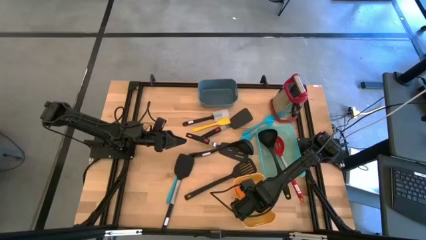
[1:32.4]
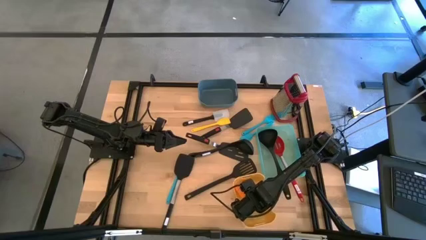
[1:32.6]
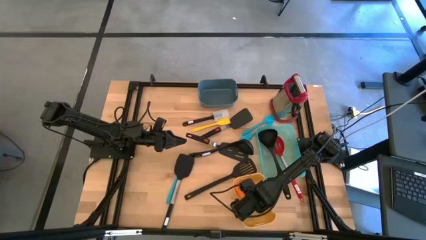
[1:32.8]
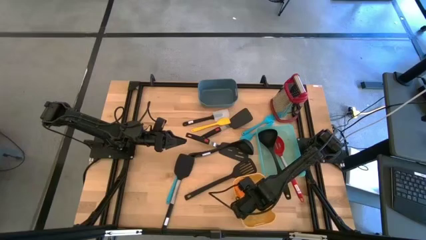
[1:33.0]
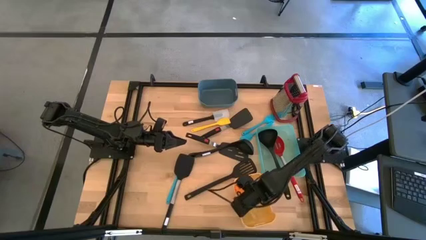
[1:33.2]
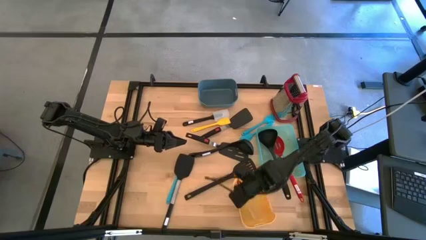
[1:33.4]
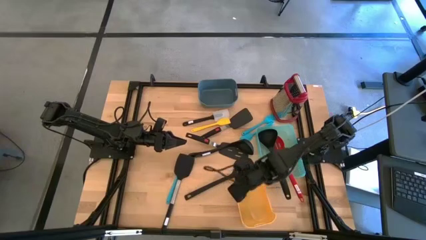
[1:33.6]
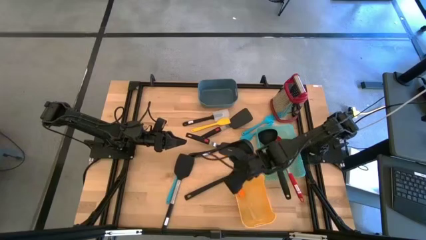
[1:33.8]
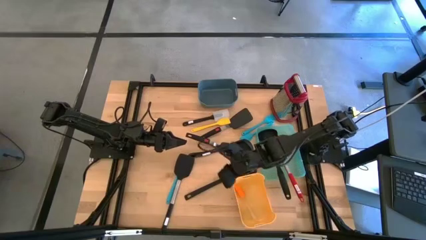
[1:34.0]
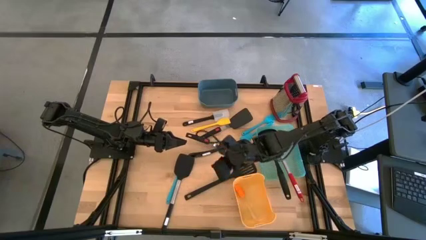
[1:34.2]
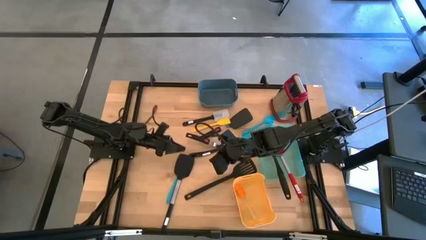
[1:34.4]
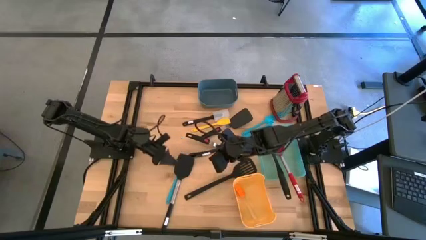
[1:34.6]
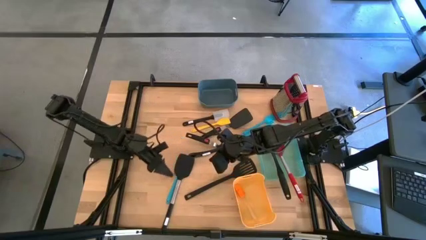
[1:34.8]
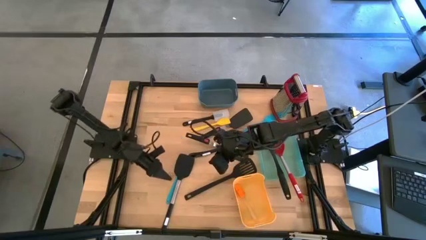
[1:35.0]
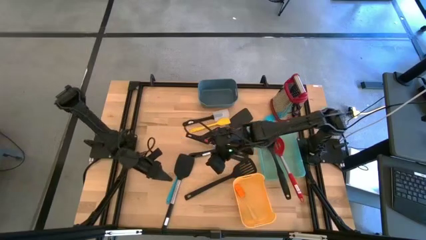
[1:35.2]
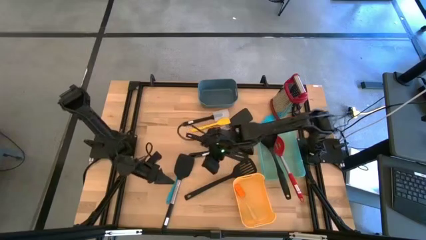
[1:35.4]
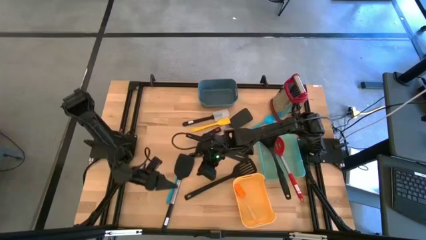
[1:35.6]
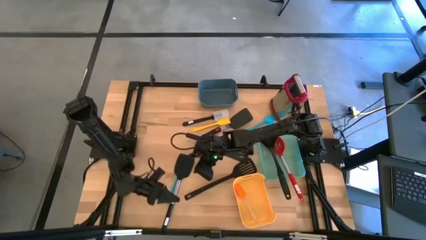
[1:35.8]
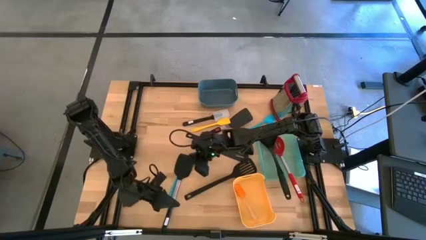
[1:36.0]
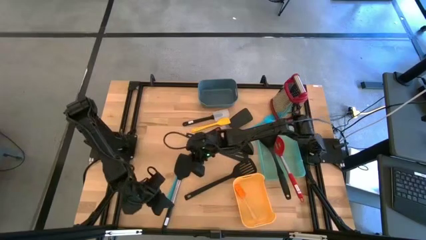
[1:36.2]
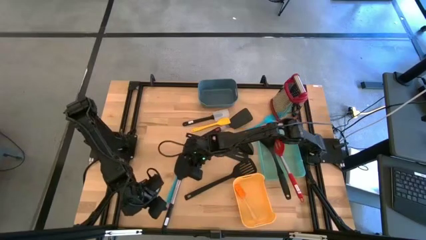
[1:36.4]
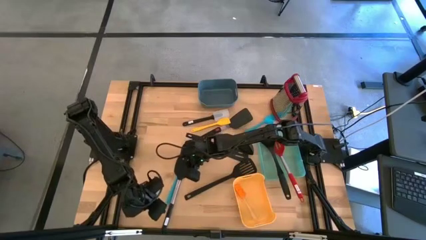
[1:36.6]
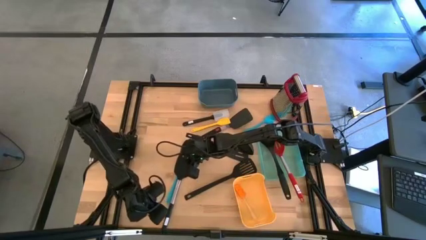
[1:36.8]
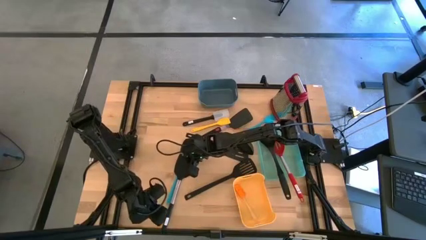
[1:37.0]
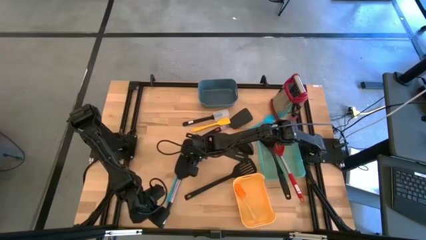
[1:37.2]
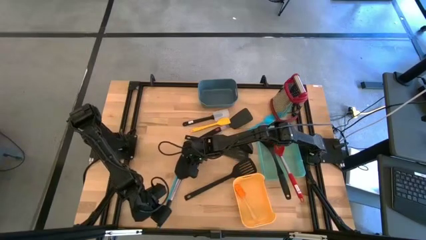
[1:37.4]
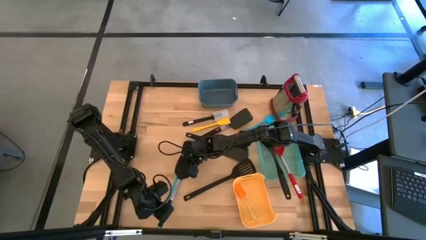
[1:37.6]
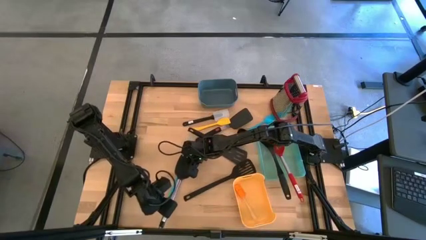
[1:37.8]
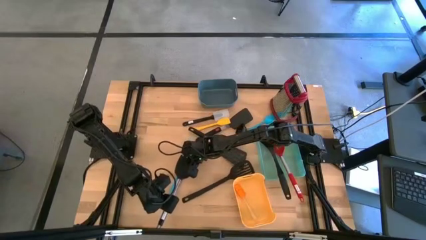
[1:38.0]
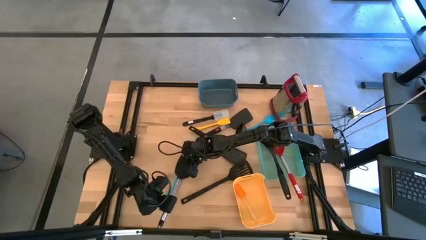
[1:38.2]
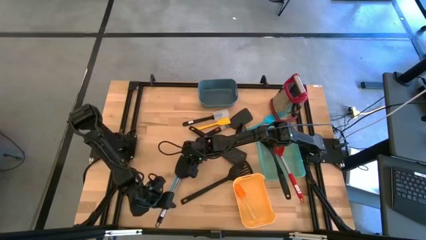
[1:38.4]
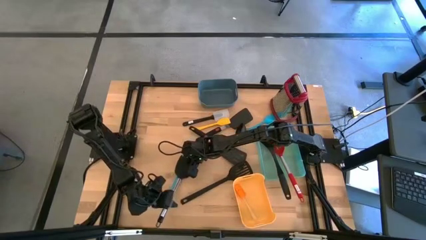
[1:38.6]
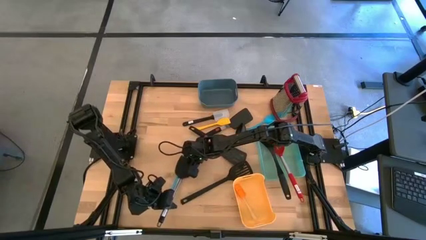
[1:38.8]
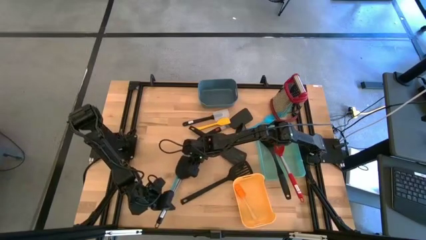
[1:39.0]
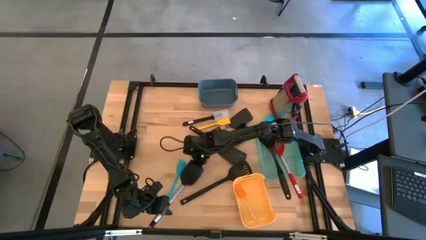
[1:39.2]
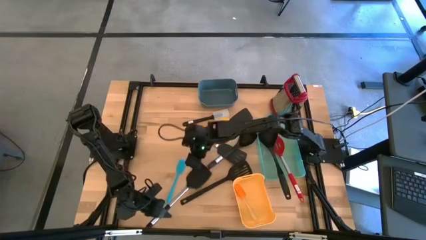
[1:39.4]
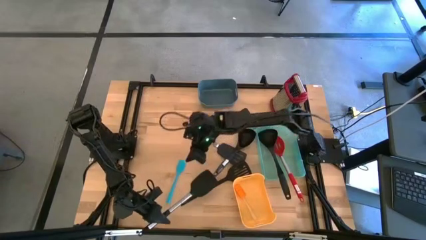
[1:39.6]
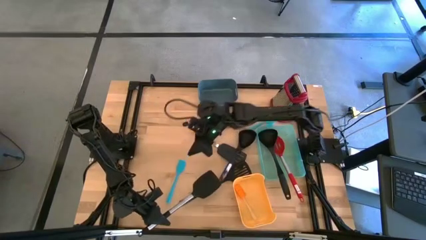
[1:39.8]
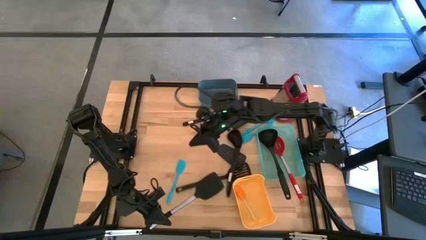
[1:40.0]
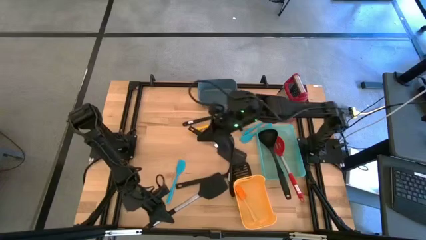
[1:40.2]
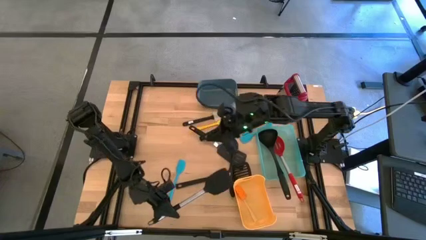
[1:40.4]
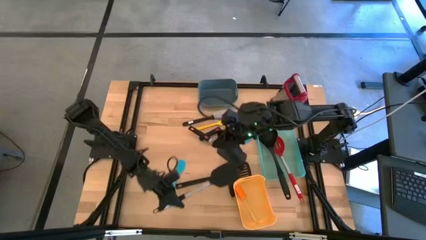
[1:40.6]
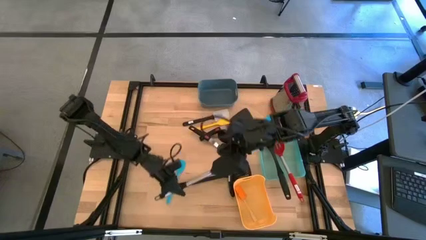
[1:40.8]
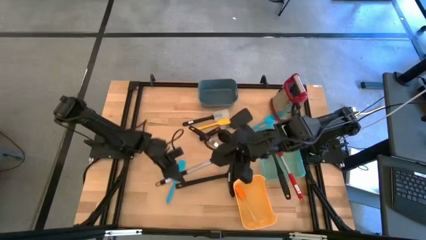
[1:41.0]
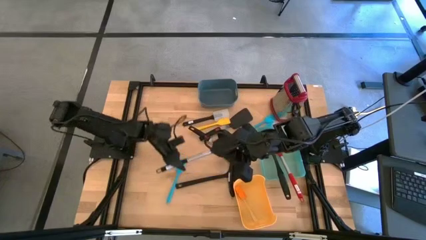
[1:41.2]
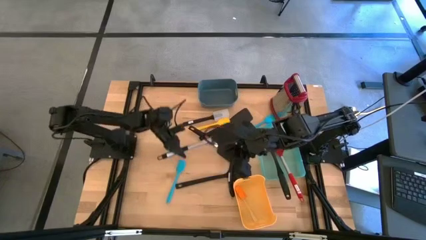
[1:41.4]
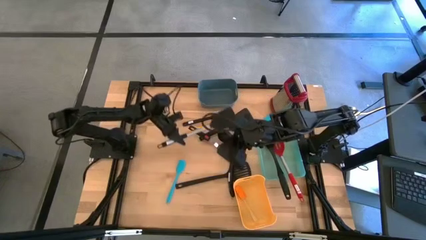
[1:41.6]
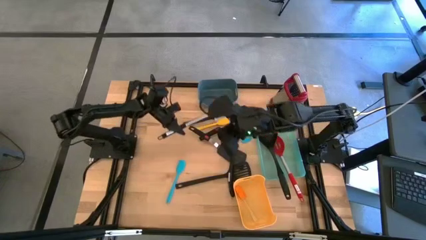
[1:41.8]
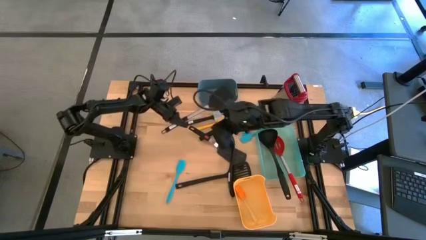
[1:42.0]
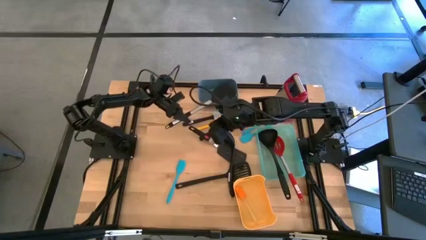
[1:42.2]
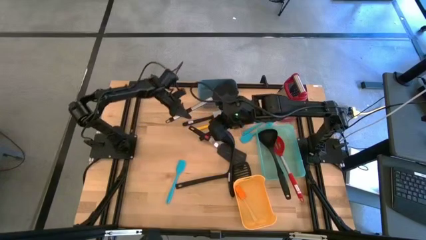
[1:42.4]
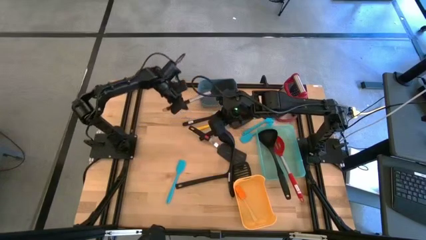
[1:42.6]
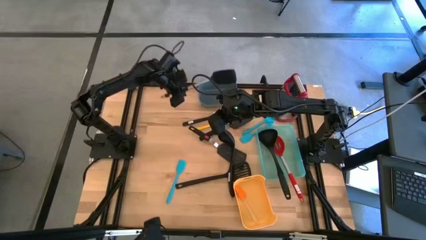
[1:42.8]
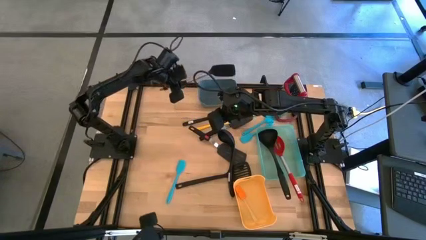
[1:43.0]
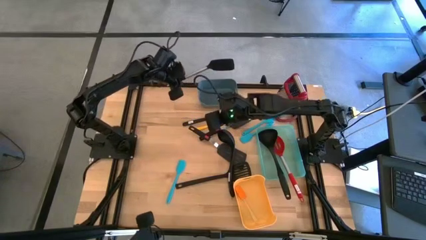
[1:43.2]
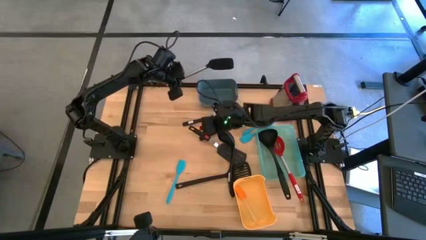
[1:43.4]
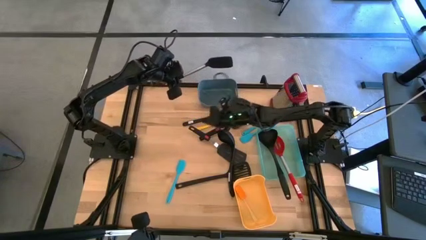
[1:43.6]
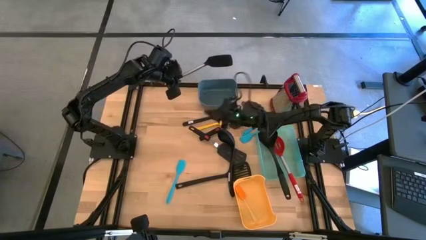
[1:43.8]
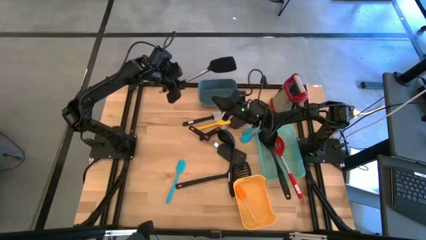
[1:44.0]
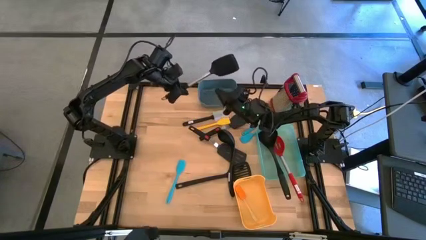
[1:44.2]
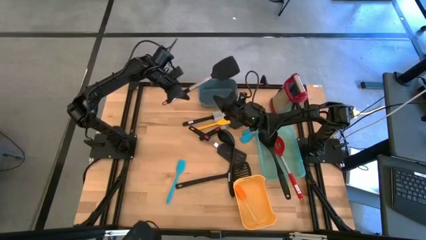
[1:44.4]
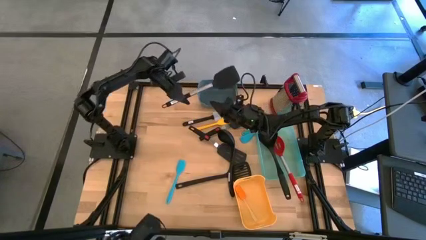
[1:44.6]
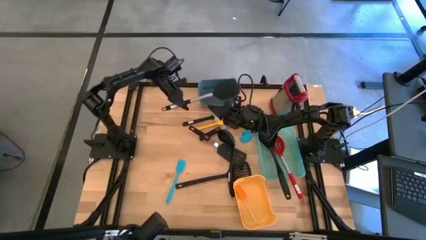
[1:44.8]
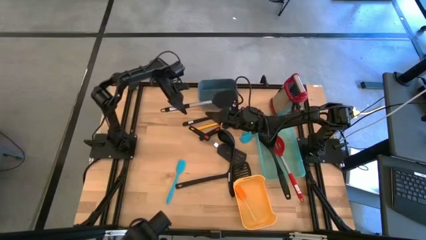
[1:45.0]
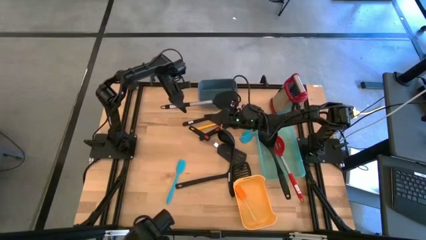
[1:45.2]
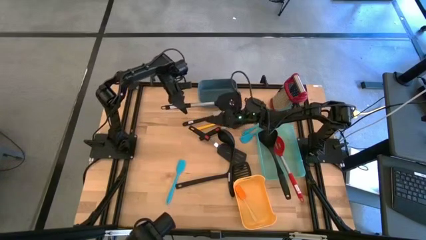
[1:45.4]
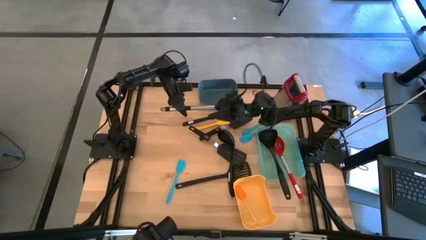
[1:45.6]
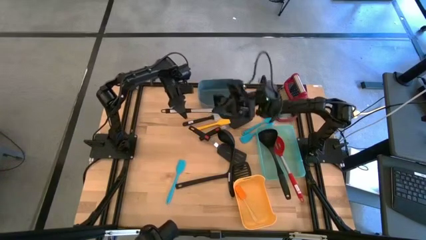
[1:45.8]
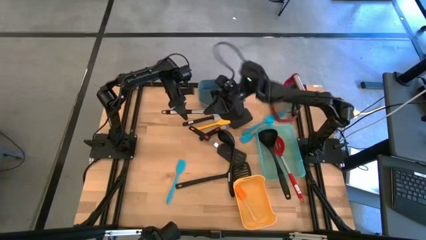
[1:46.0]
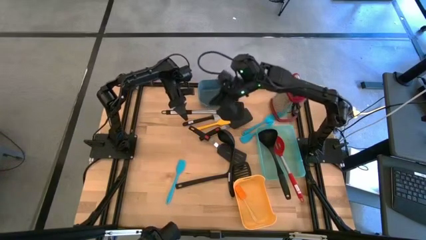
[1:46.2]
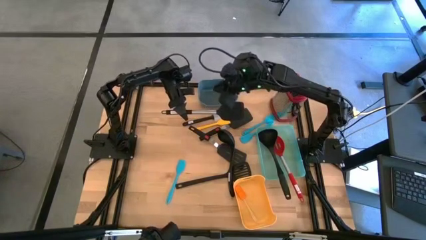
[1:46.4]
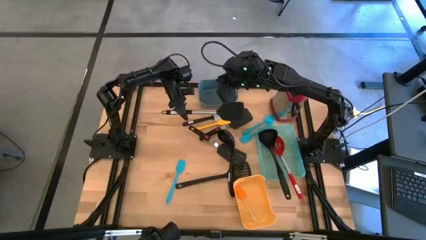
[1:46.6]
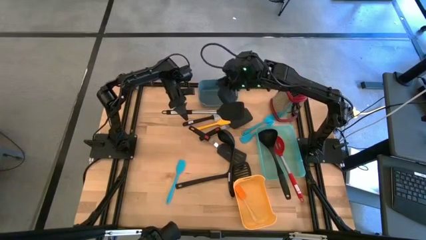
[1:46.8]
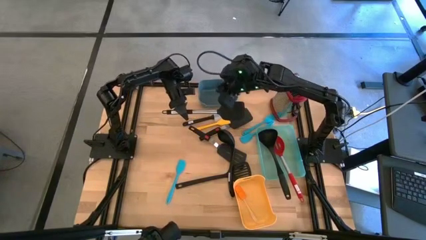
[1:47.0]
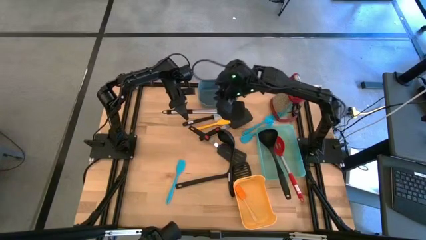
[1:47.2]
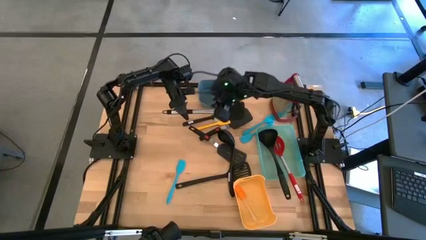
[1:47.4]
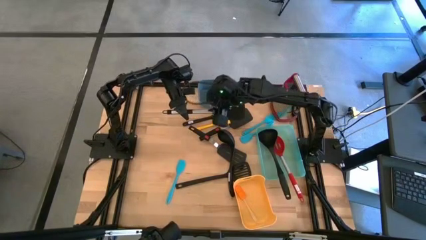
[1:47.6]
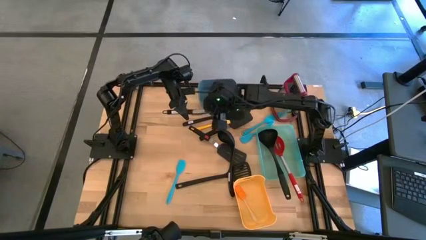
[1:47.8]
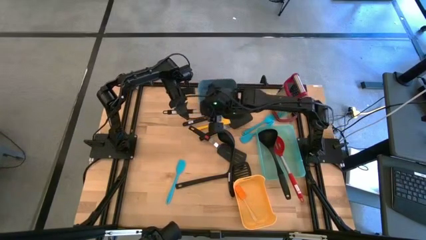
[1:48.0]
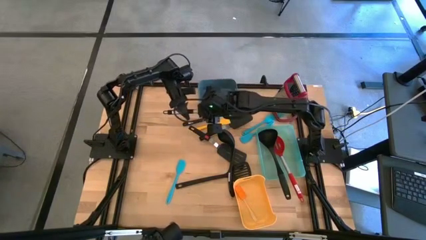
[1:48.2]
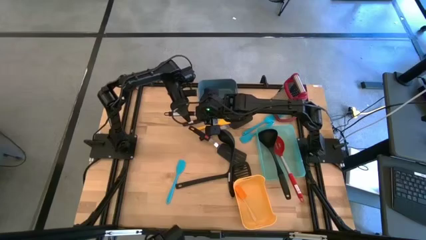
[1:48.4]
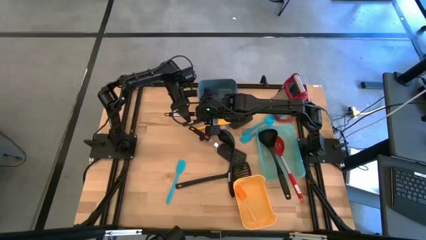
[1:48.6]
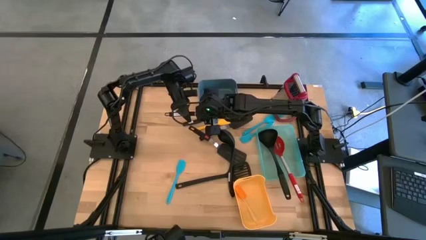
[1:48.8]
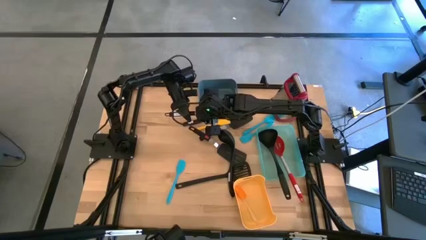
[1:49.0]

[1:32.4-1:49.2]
Task: Pick & Place Kitchen Items
Put the large black spatula into the blue bin
